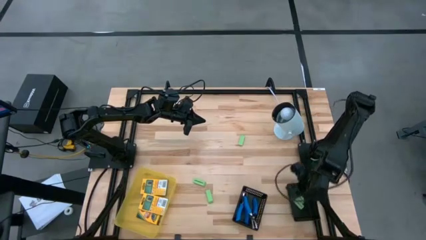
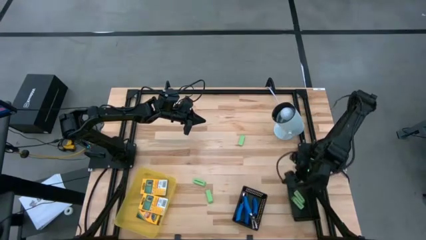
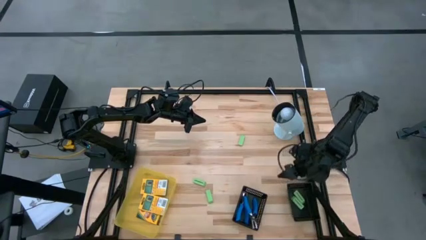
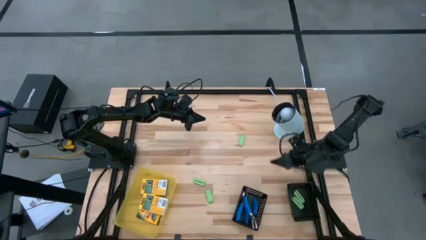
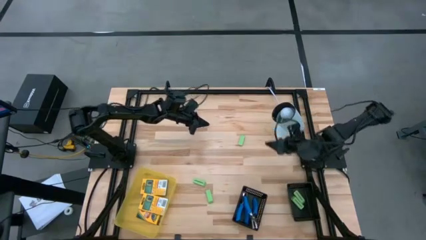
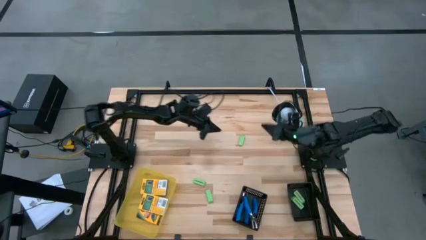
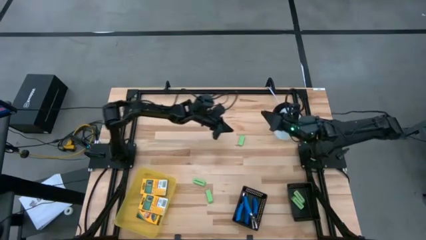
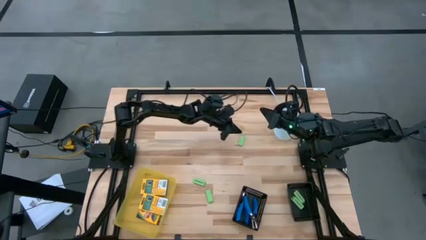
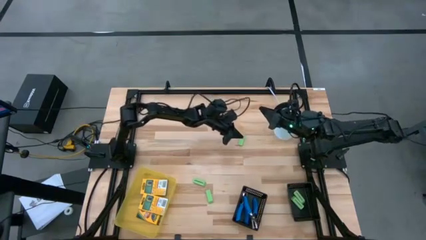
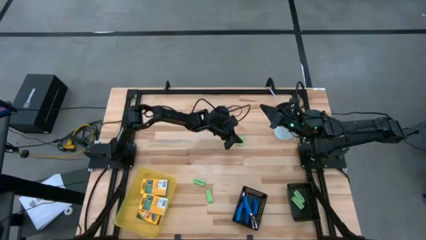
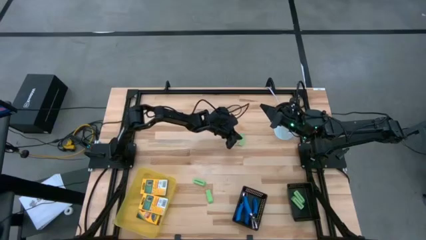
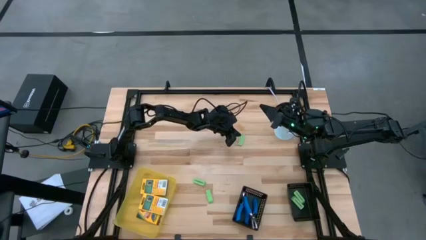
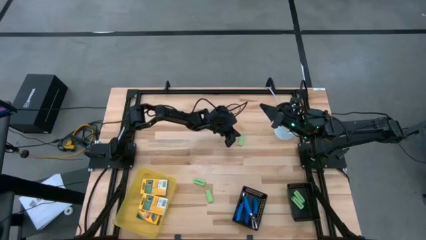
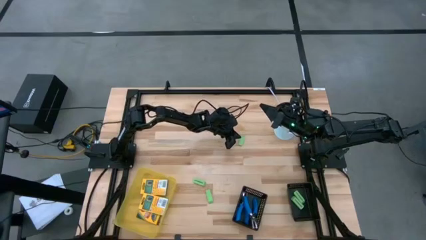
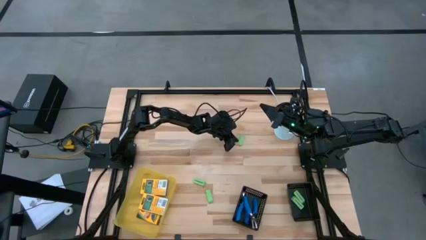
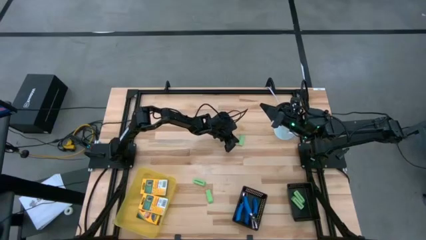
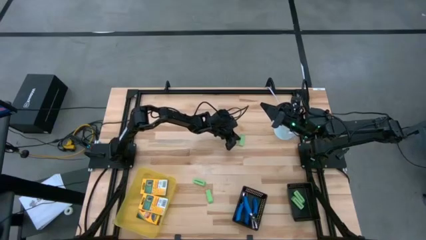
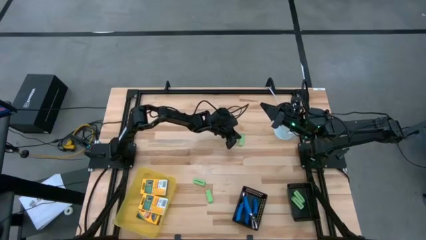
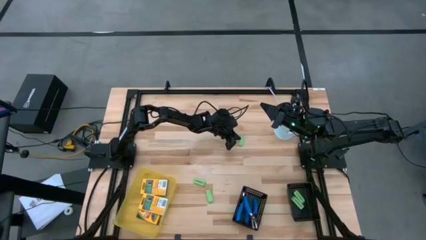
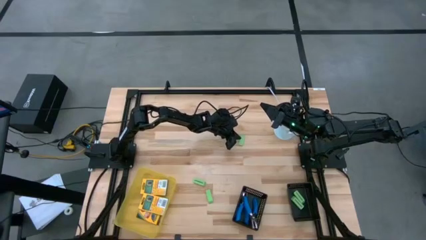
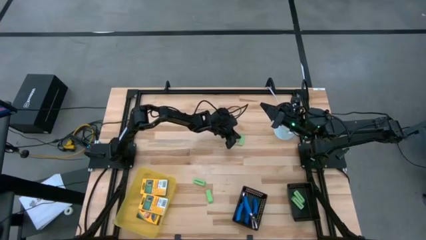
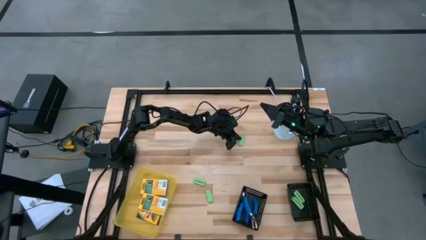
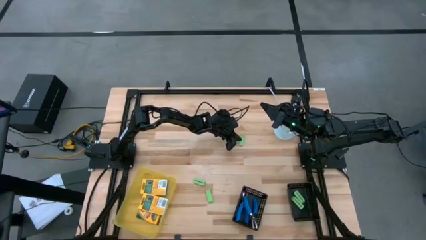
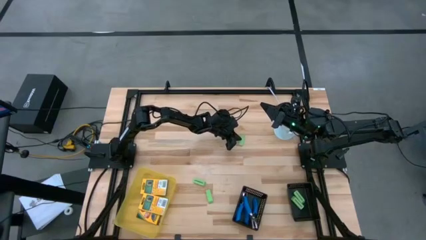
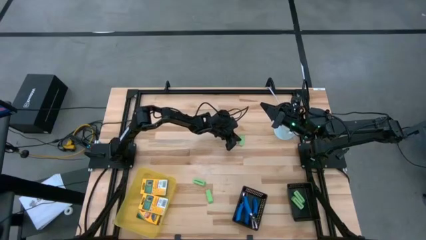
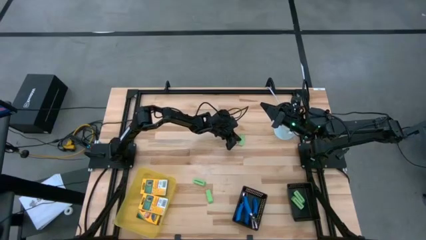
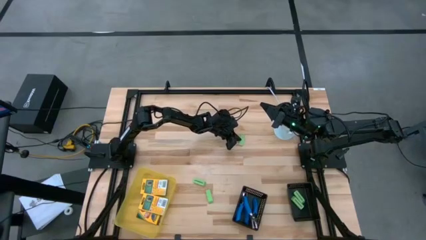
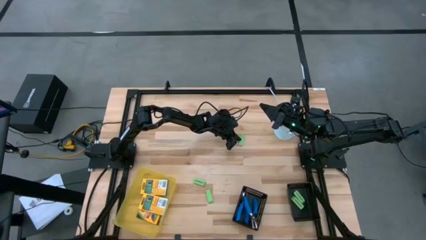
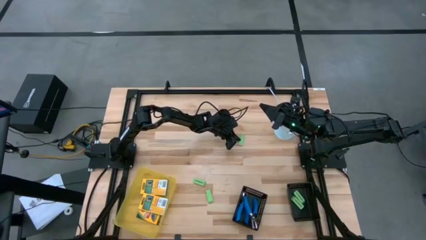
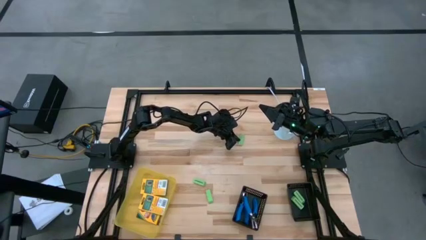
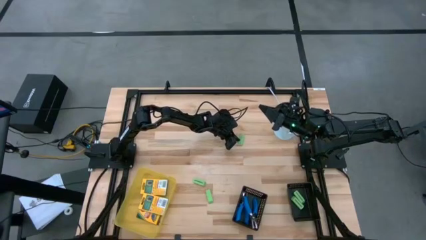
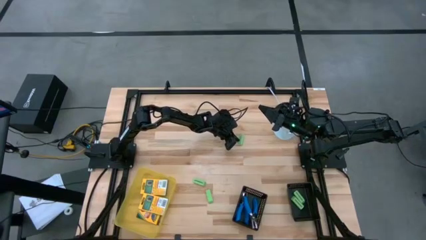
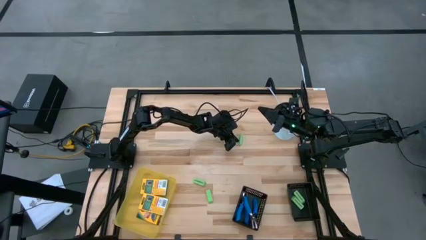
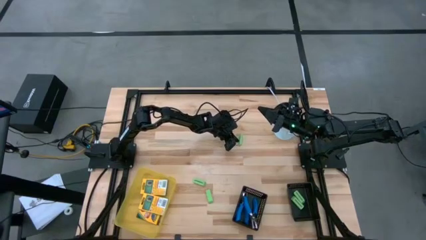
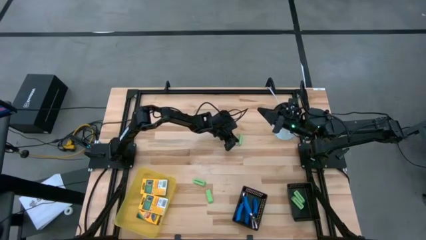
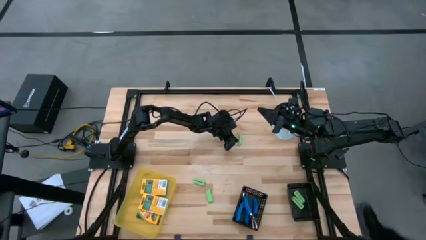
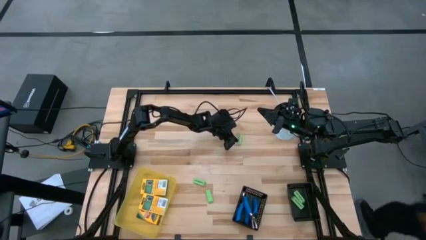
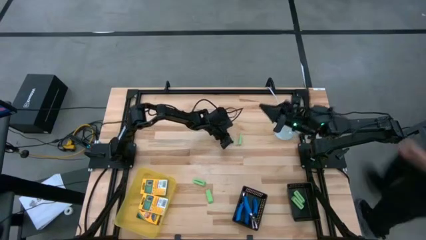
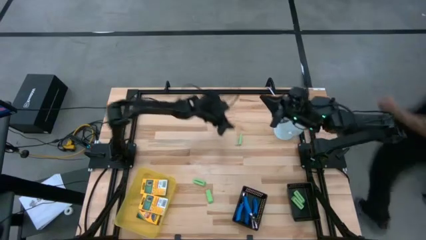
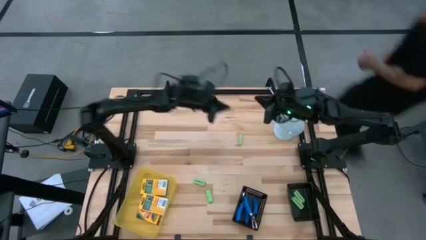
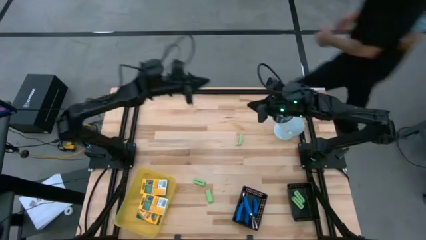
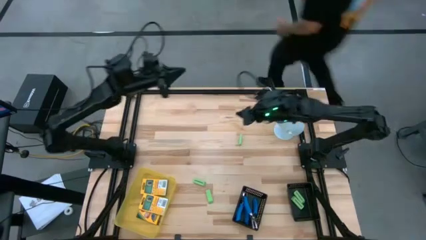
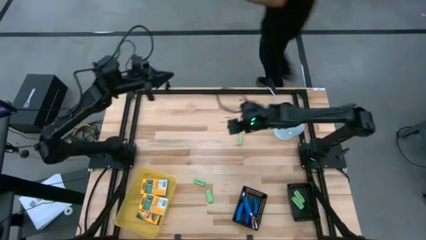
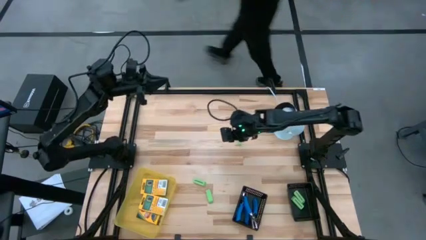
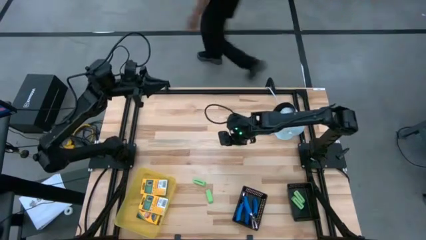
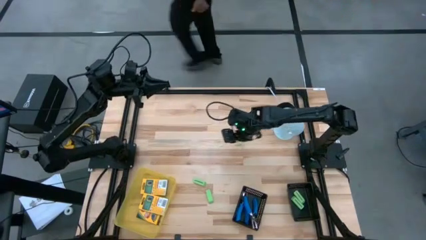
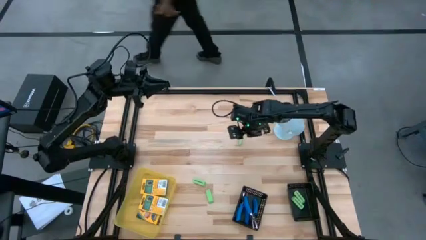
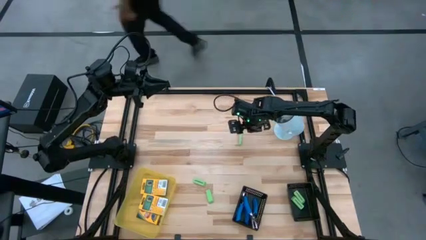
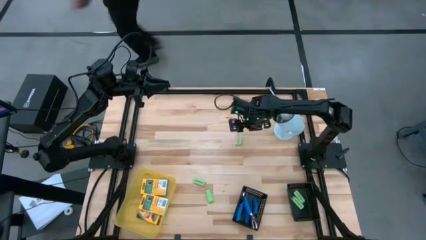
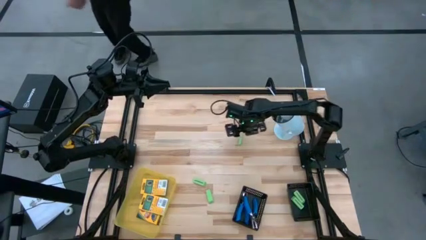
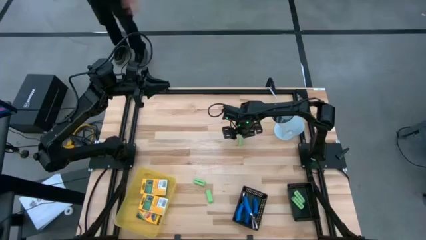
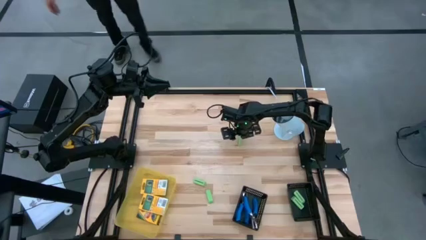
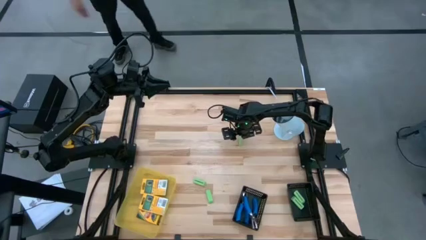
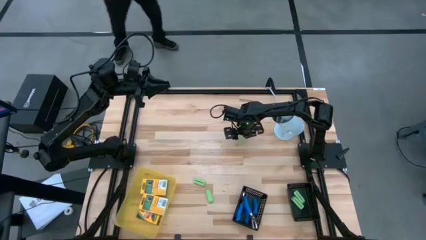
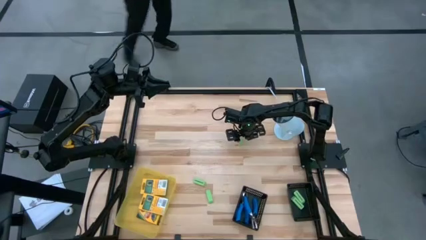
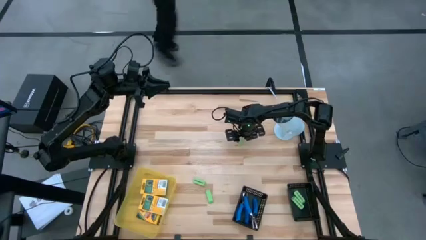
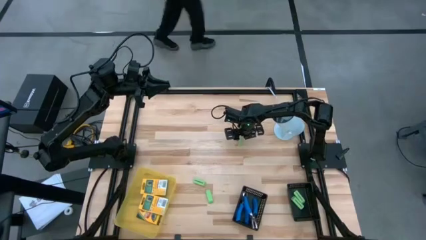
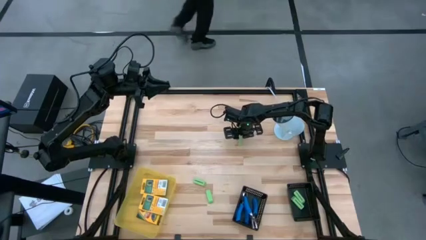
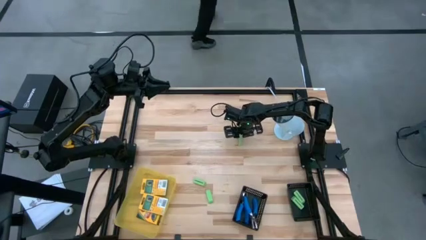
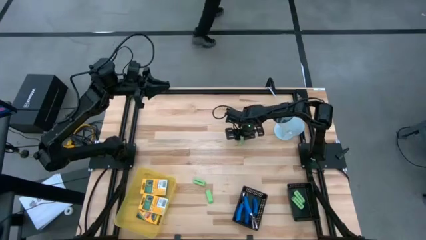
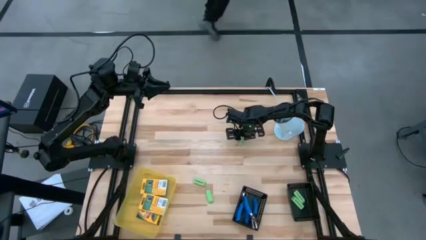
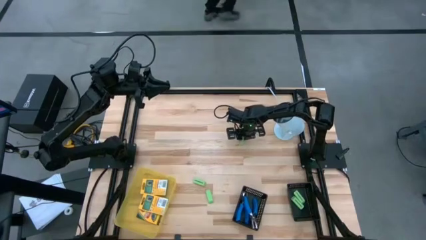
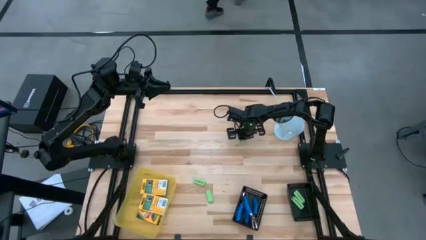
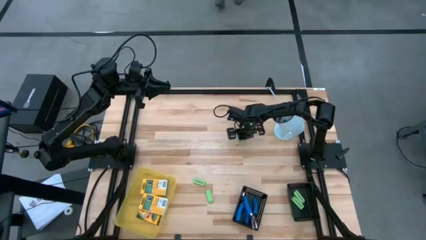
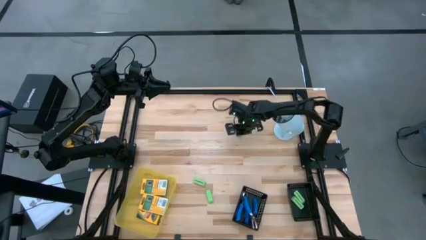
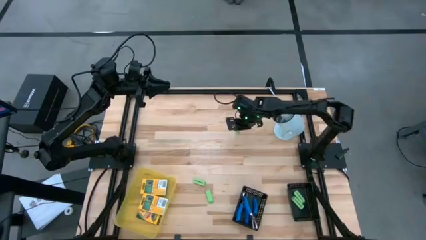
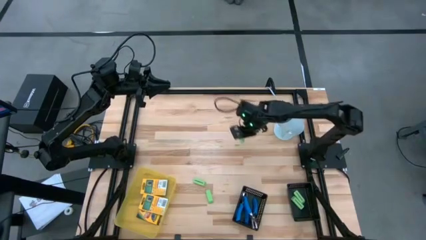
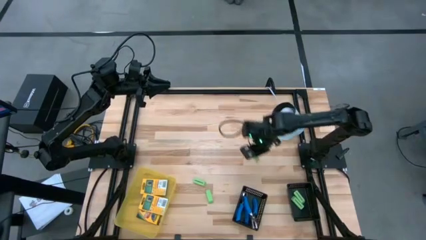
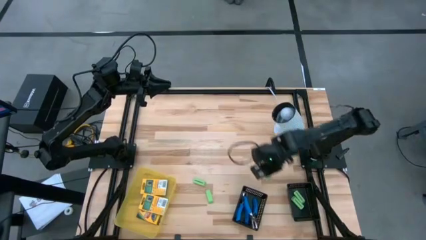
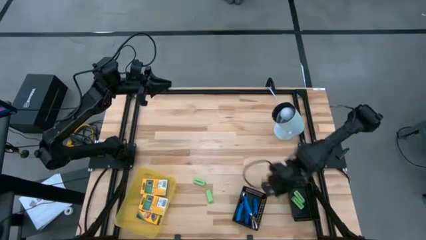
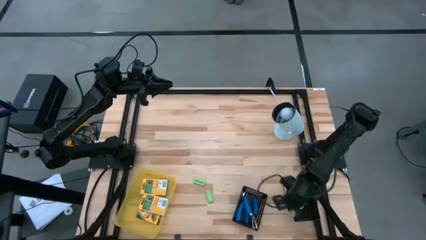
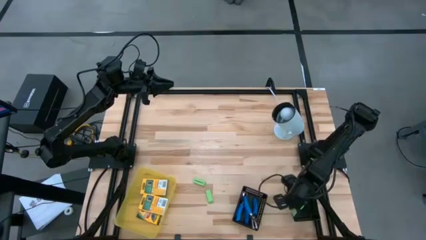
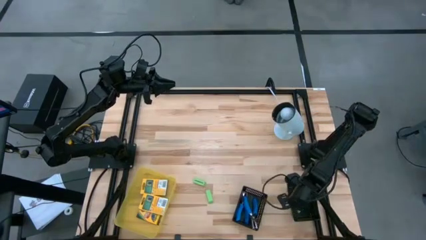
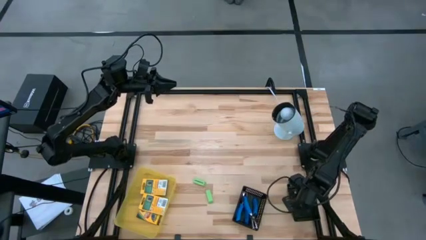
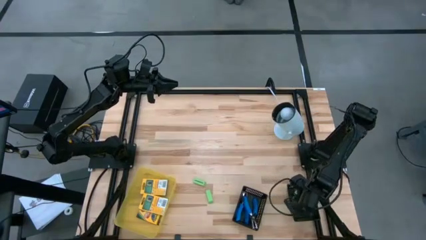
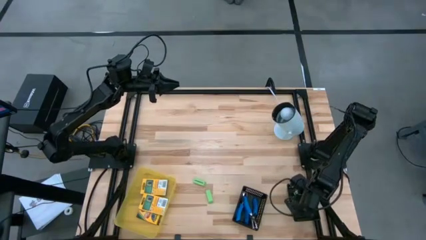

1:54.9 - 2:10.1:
Task: Pick & Place School Supplies
Put the green eraser into the right black bin

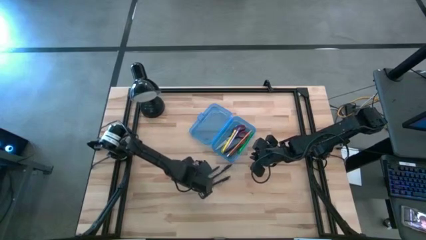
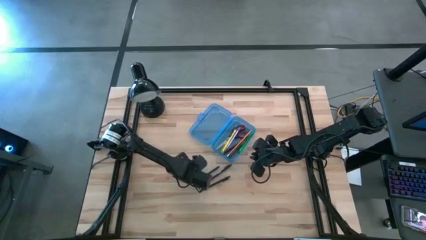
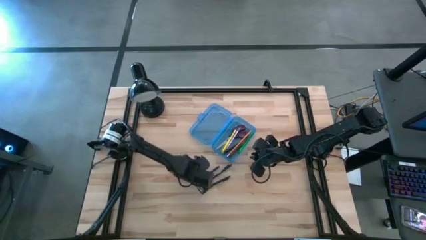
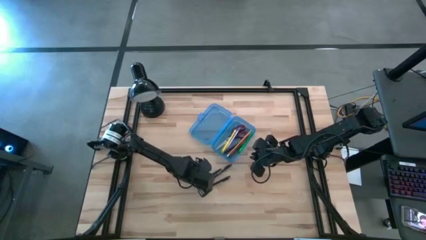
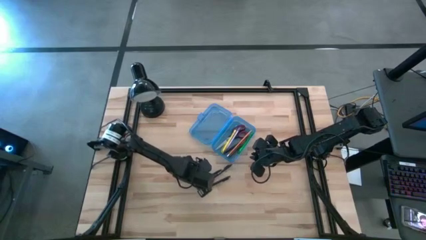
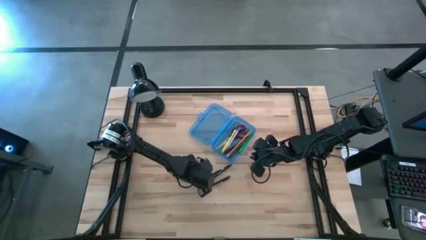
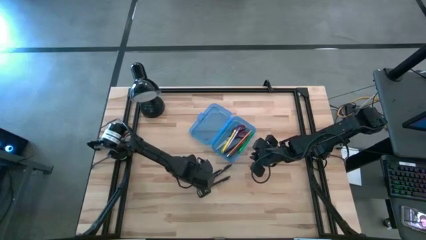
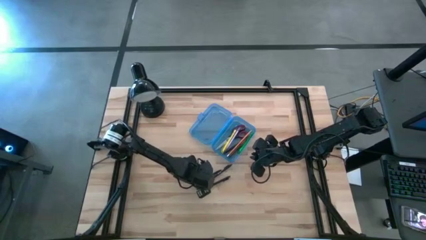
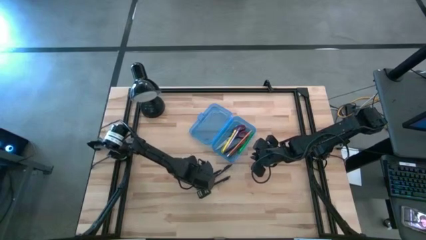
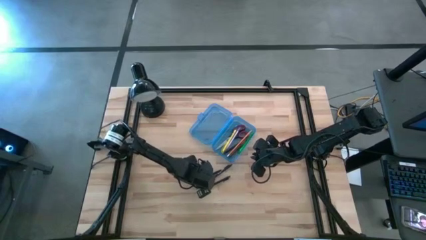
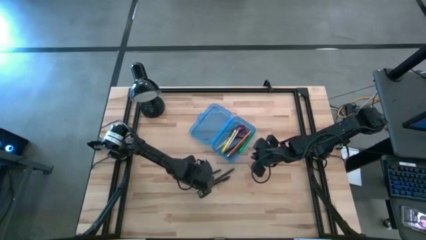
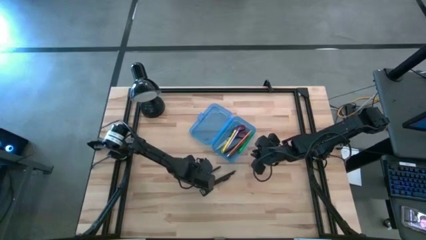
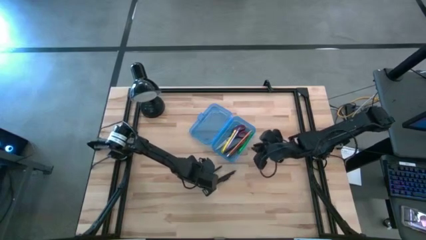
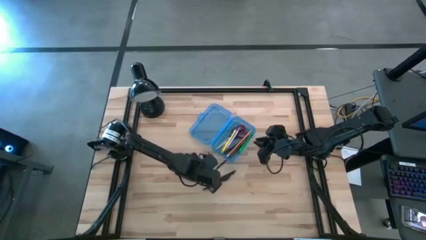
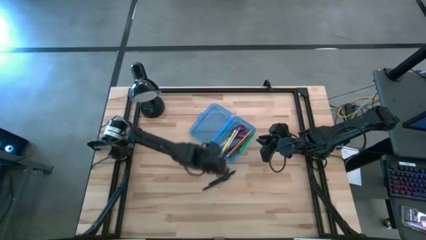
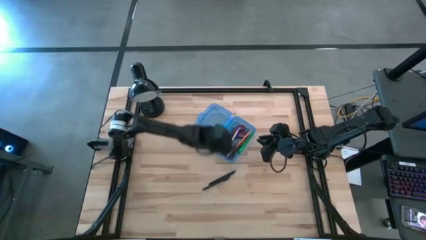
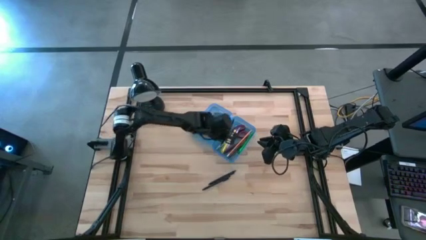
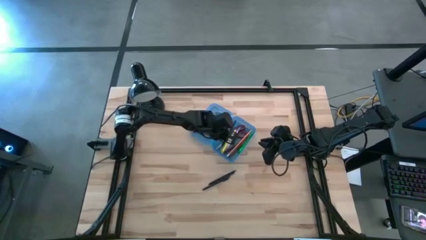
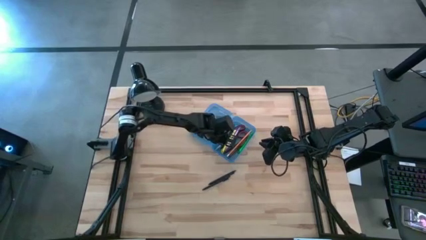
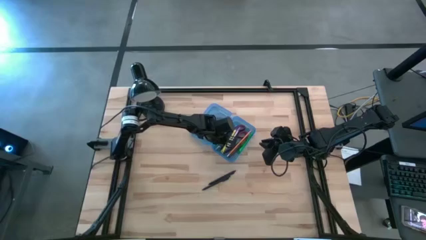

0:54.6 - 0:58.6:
Task: Pick & place school supplies into a supply box
Put the top black pen into the supply box
